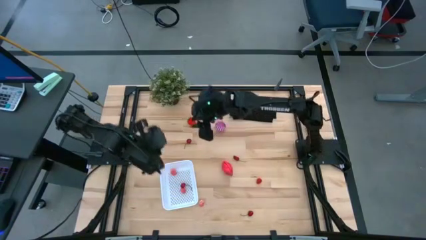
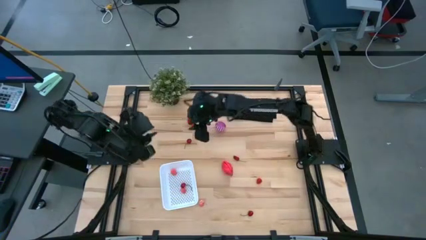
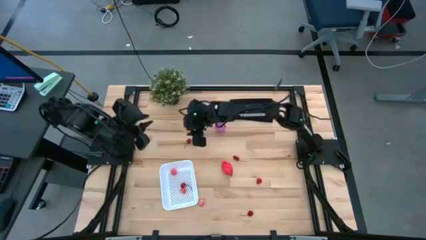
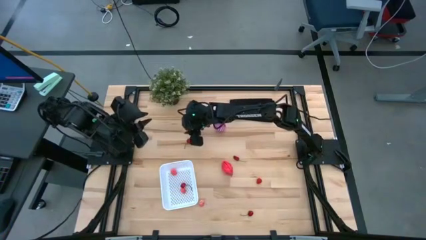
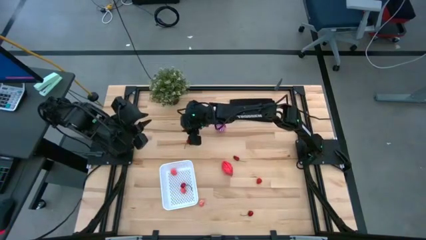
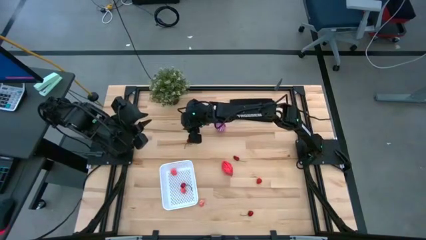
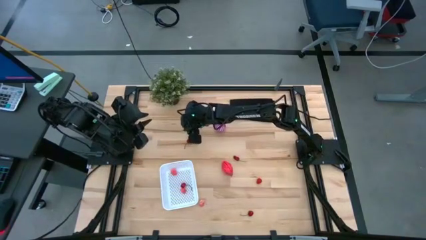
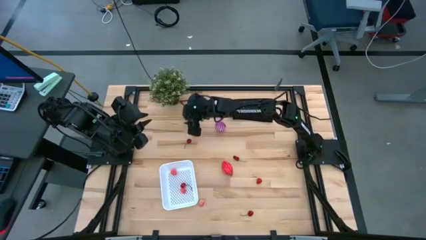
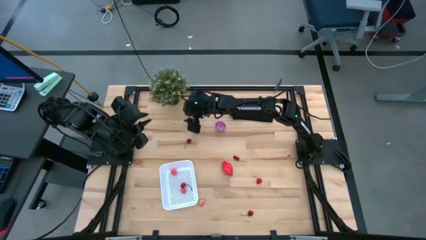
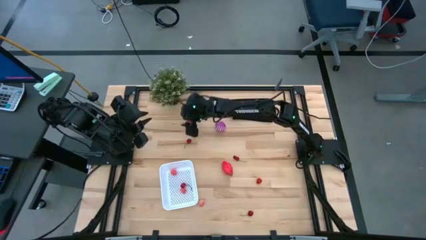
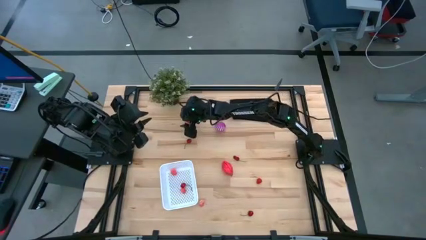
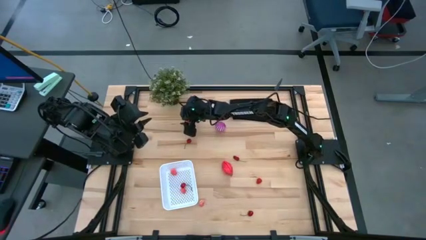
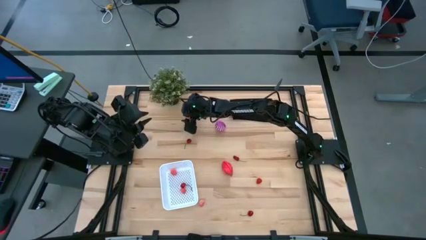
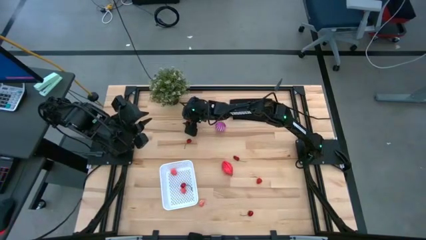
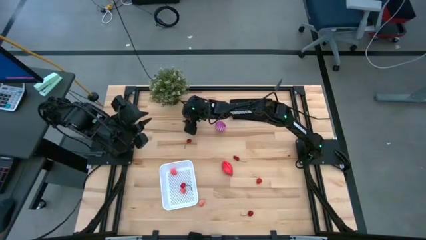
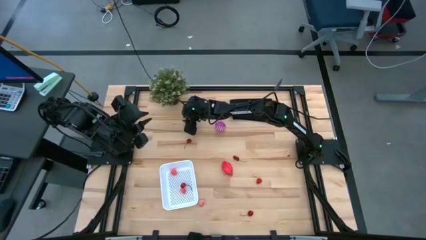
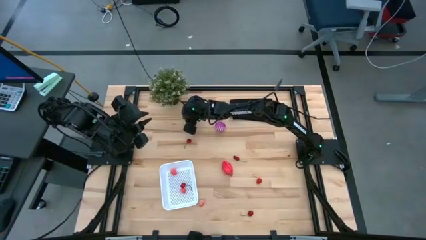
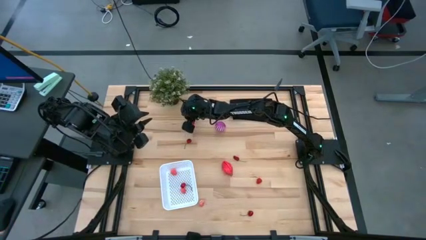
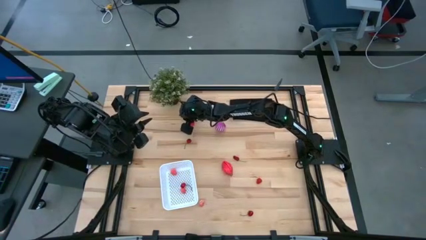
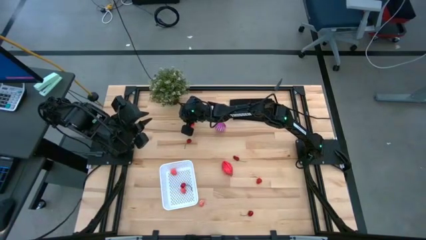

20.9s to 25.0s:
Task: Pick and placing Produce into tupperware
Put the top left strawberry into the white bin

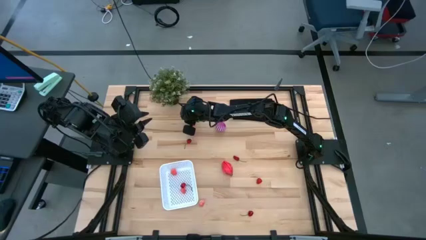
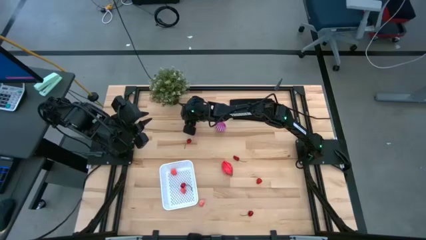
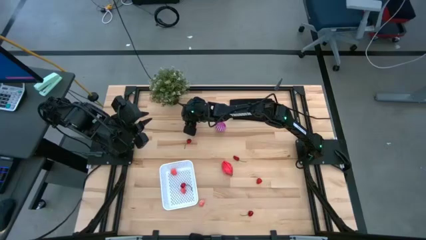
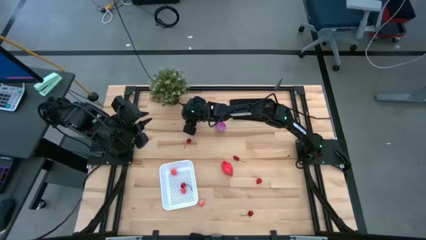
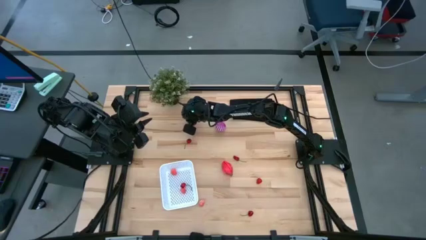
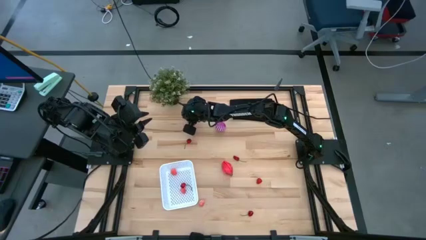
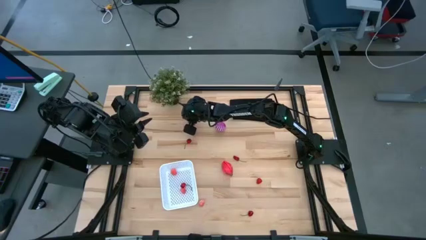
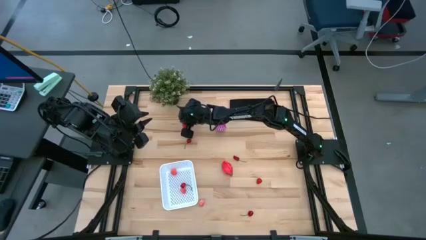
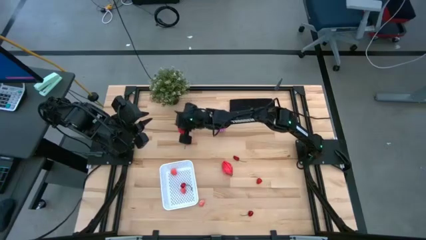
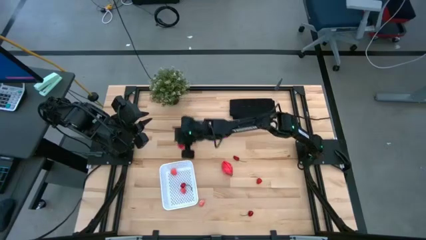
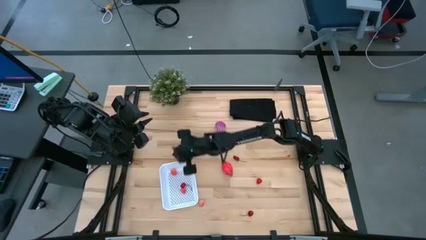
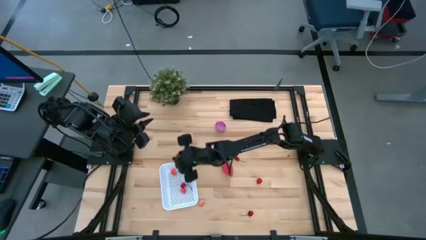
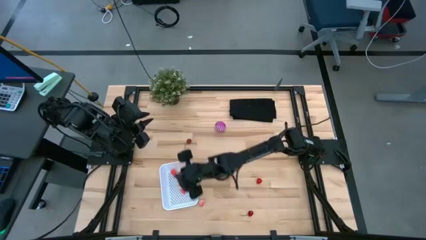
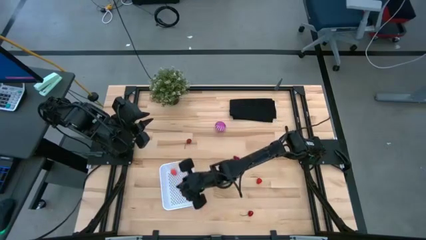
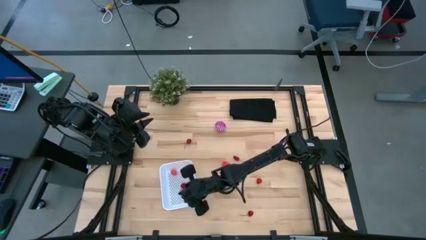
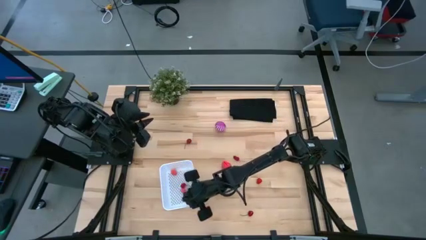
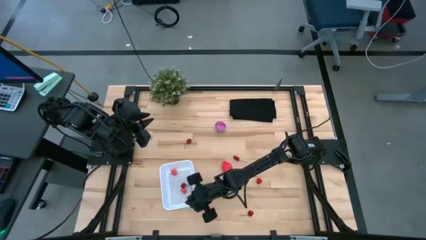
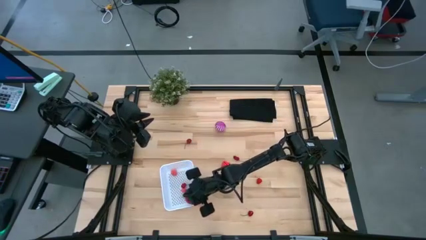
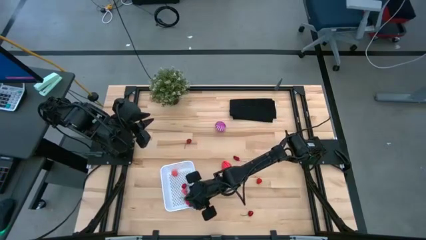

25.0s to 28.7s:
Put the top left strawberry into the white bin

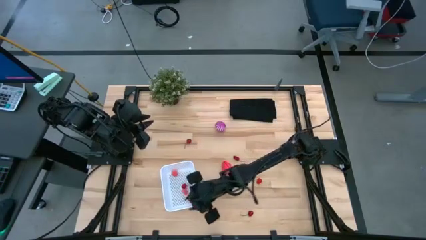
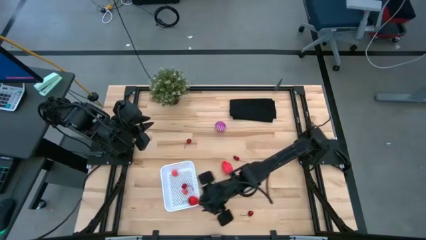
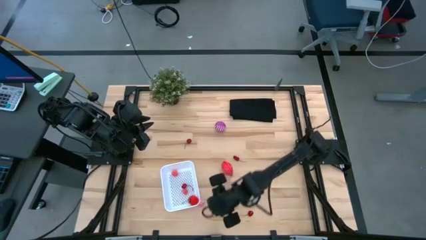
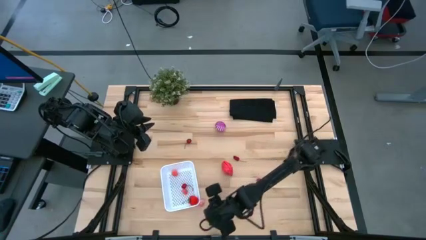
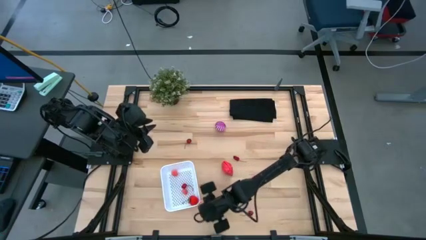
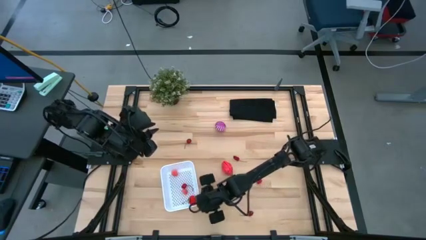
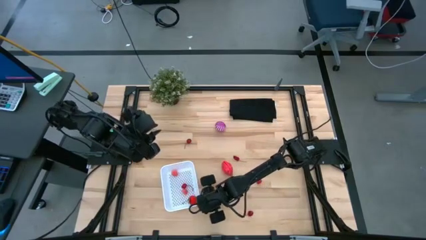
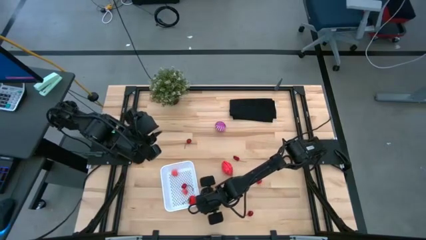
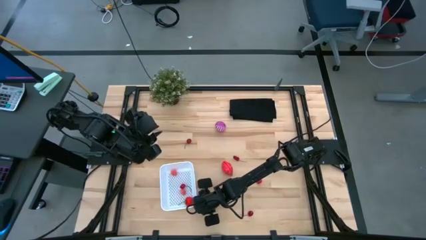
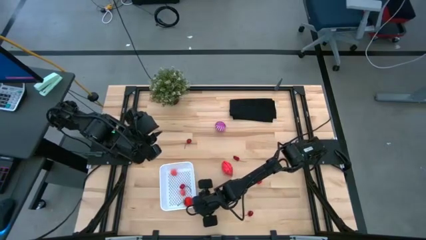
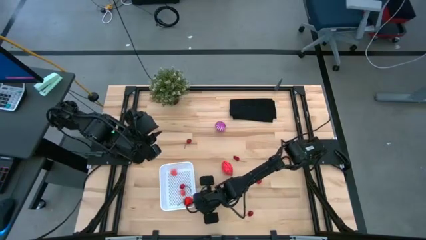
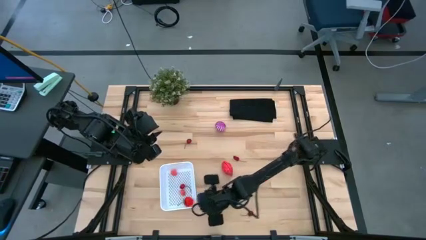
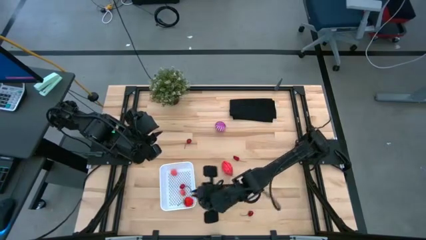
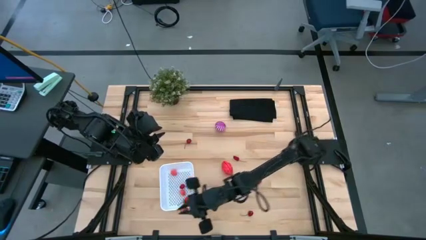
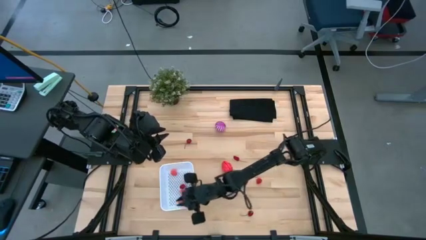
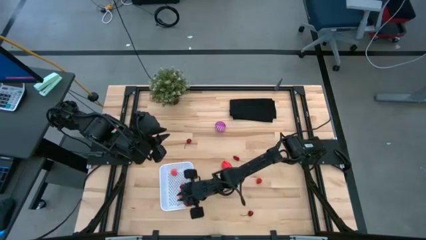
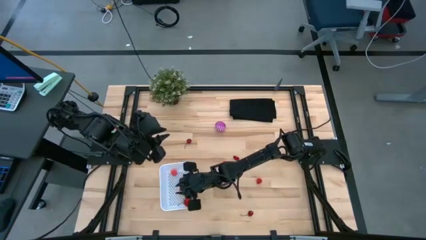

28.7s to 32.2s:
Put the lychee into the white bin

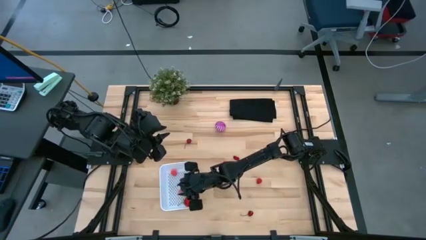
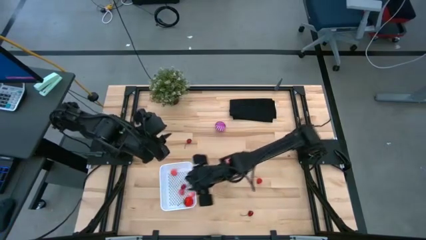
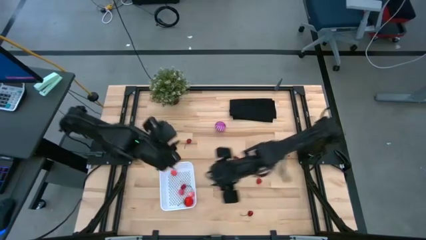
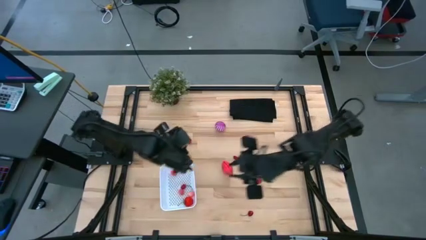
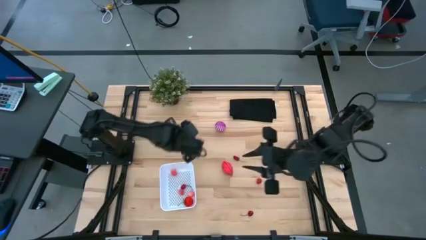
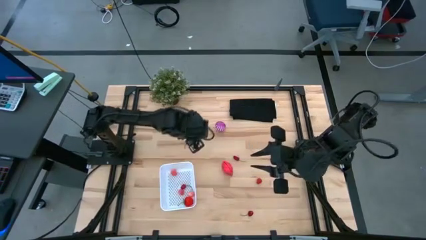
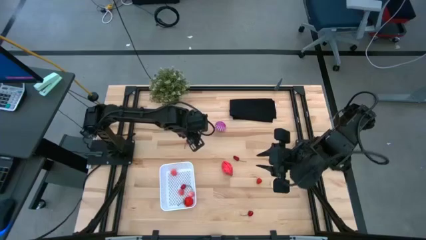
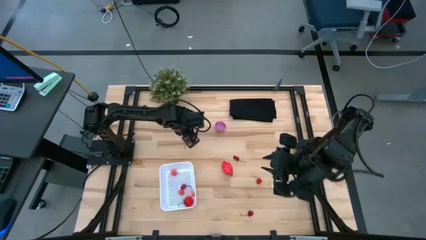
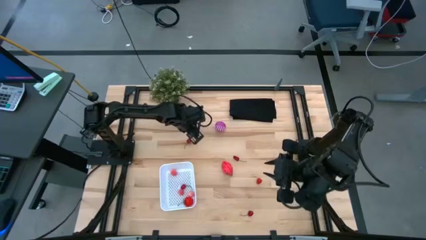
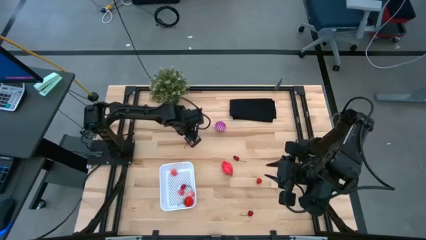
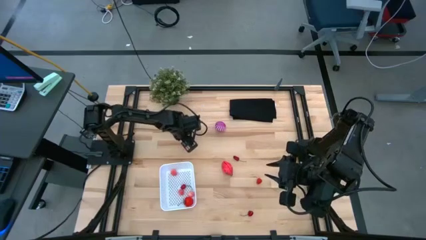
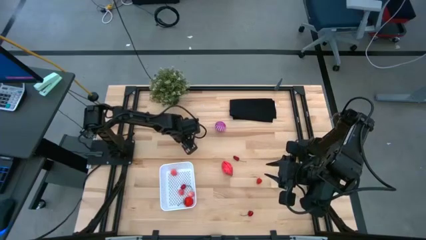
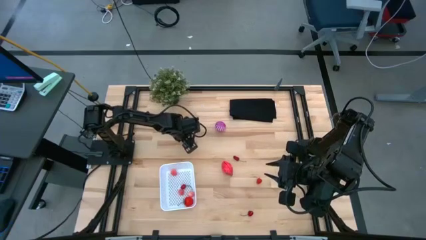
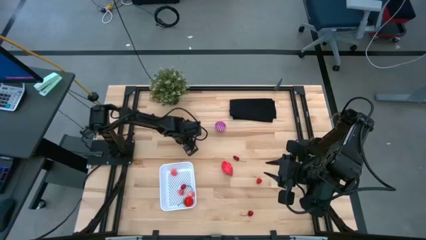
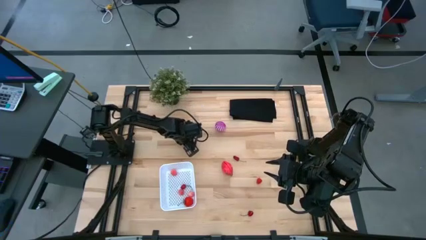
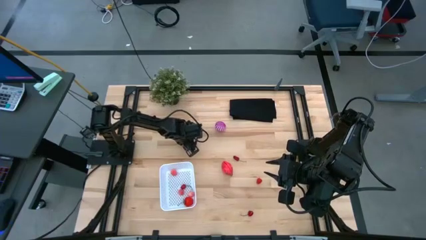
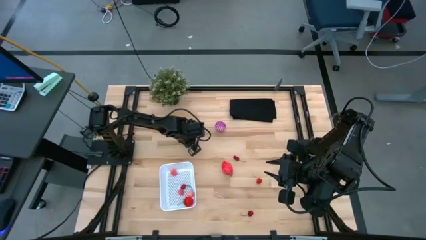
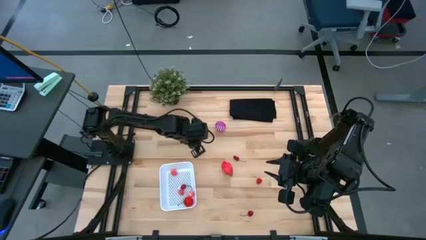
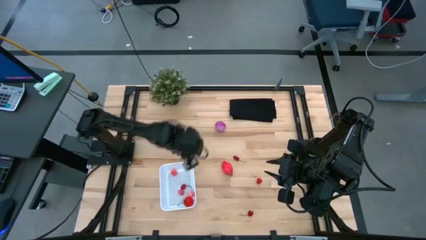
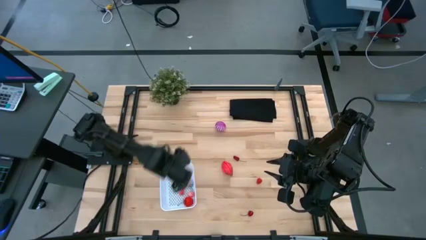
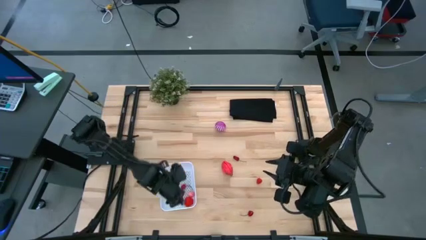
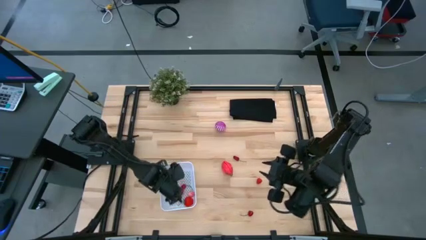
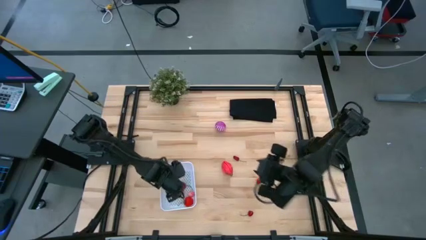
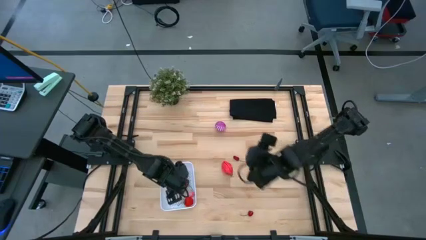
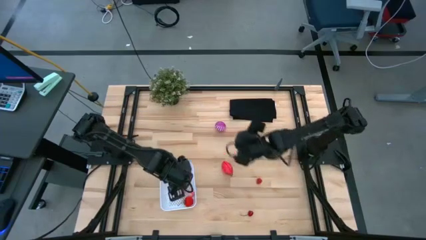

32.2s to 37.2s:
Put the top left cherry into the white bin
